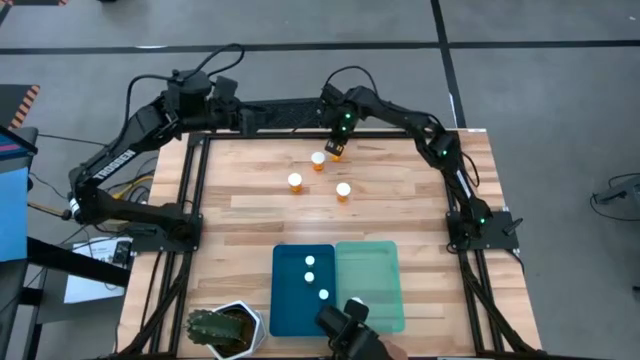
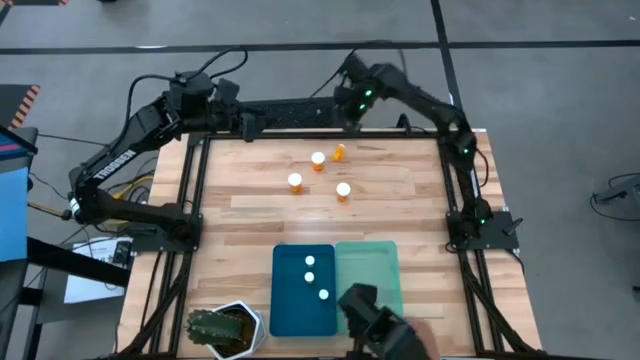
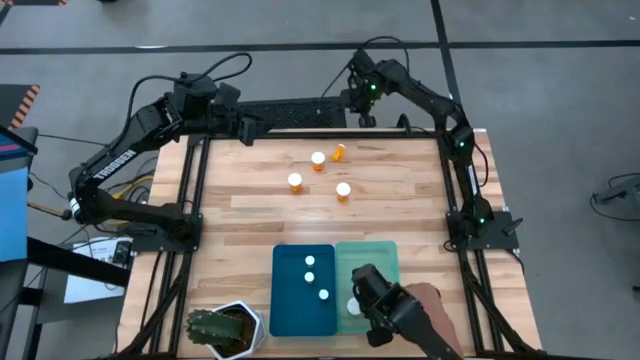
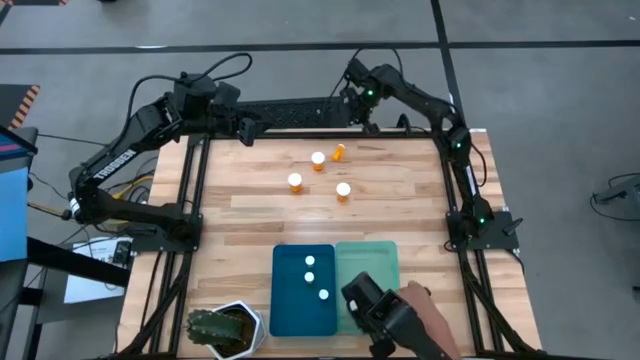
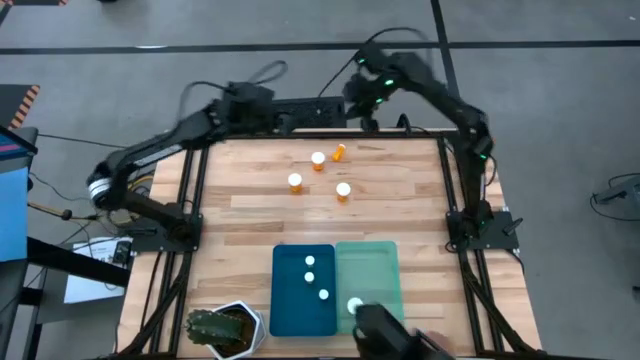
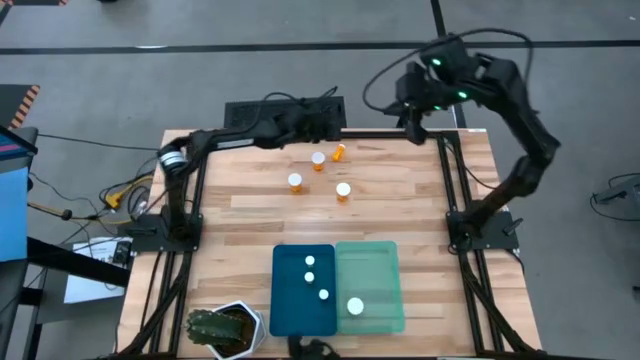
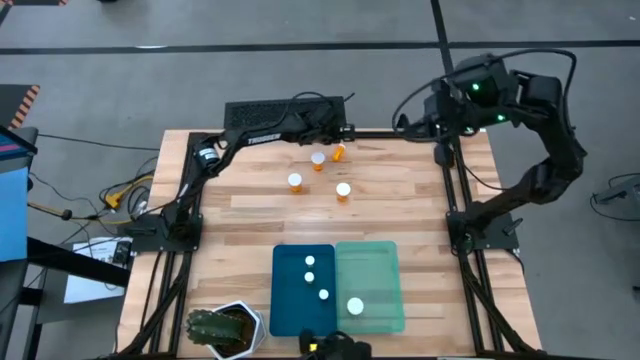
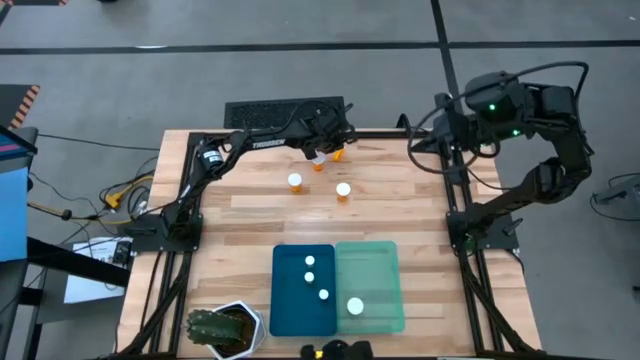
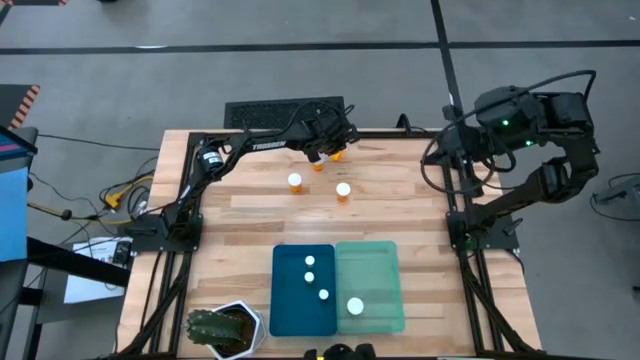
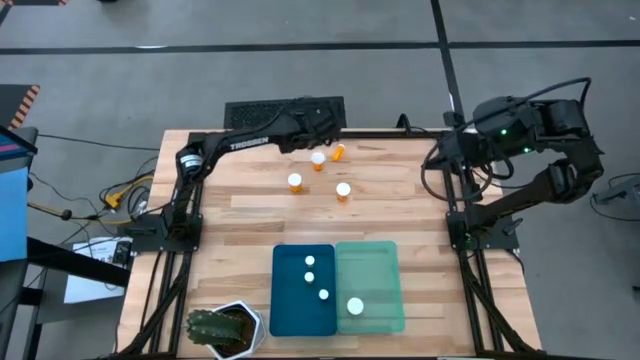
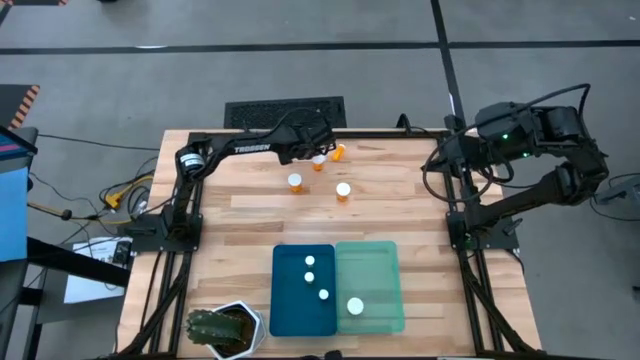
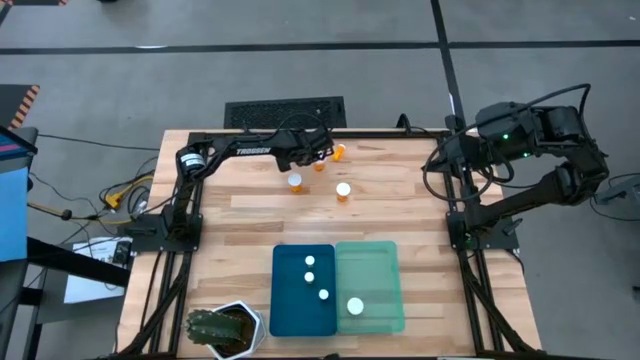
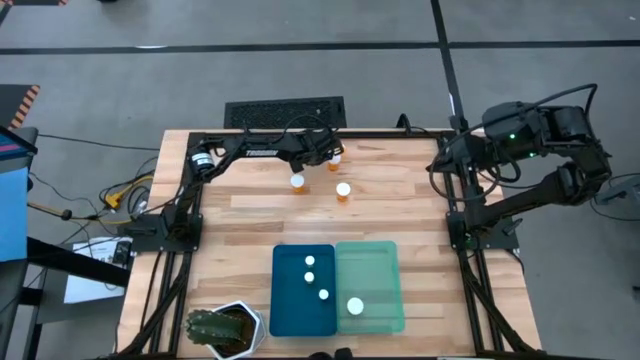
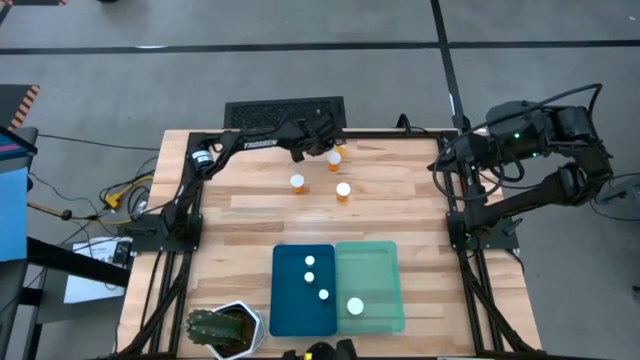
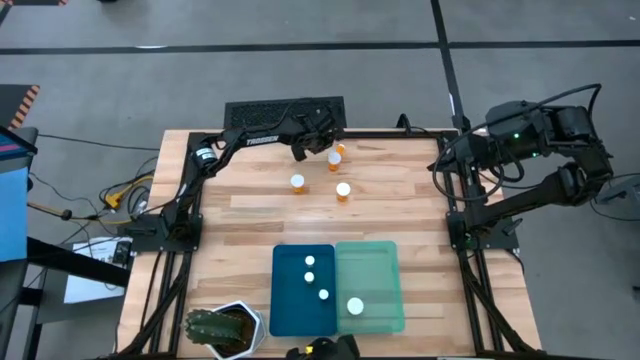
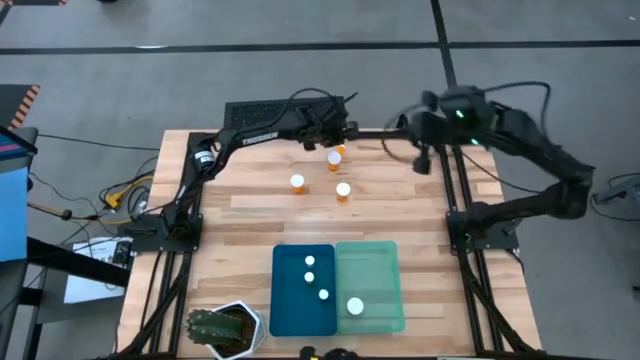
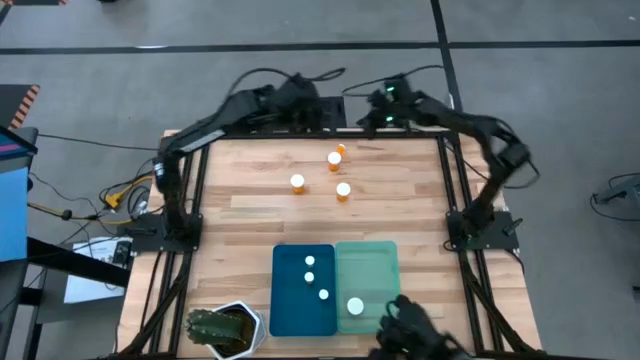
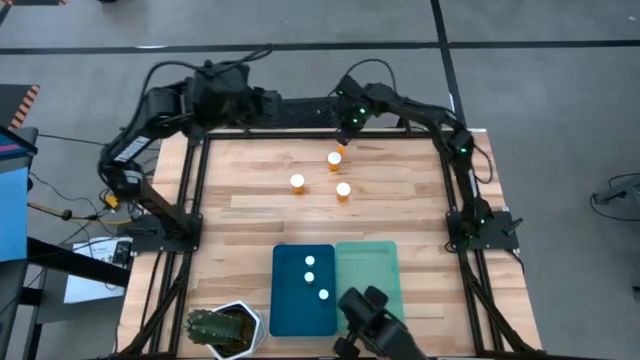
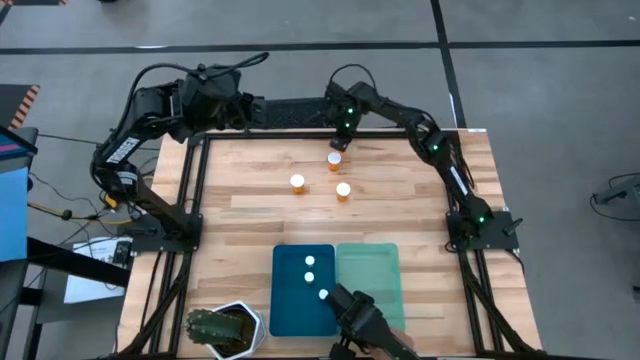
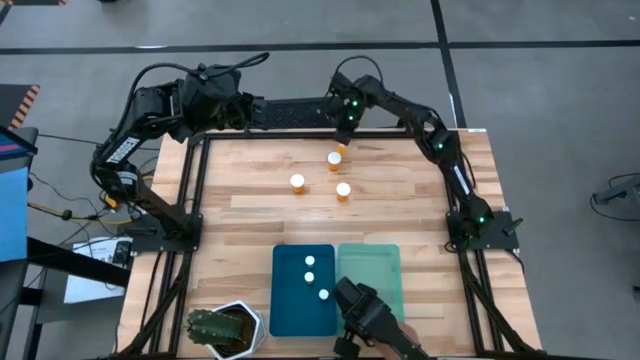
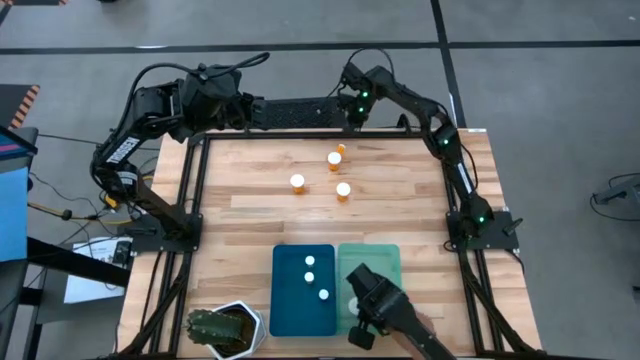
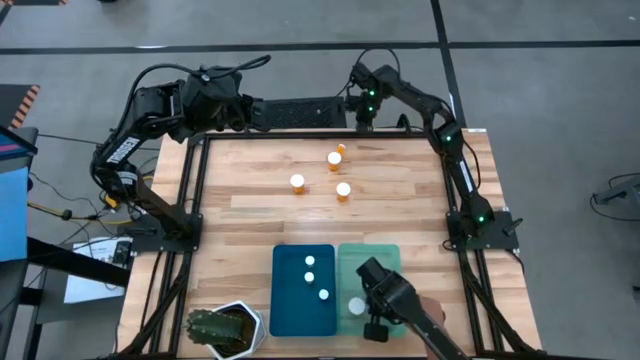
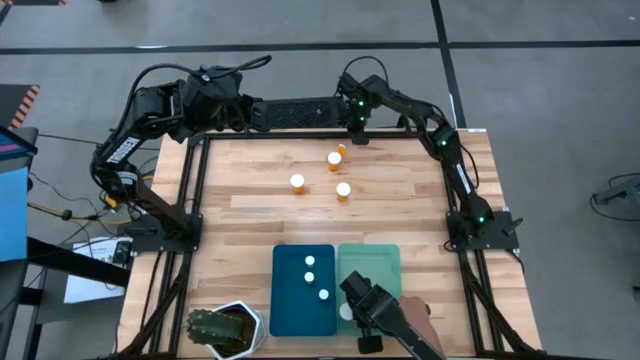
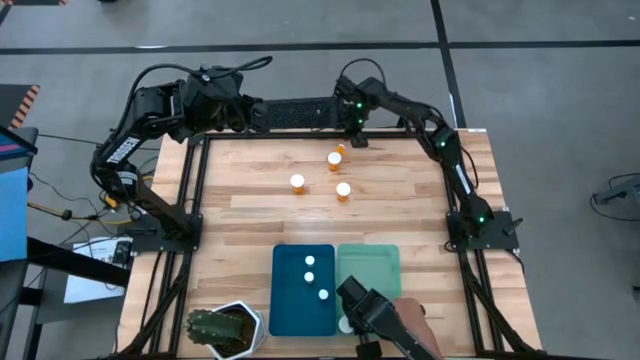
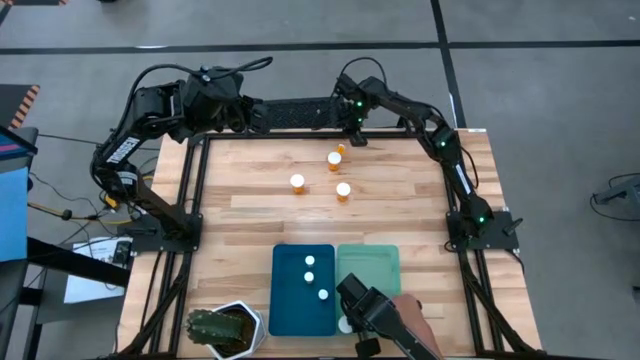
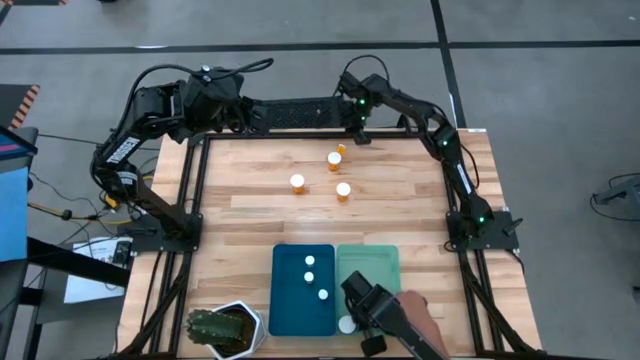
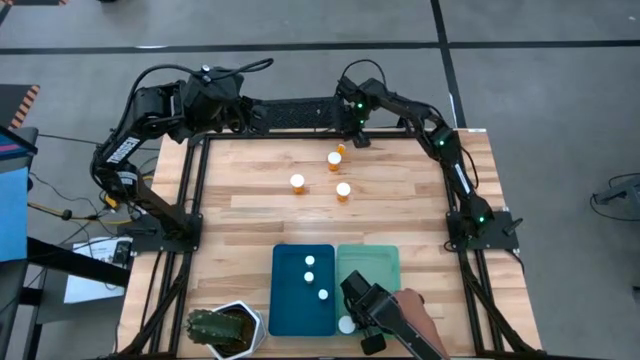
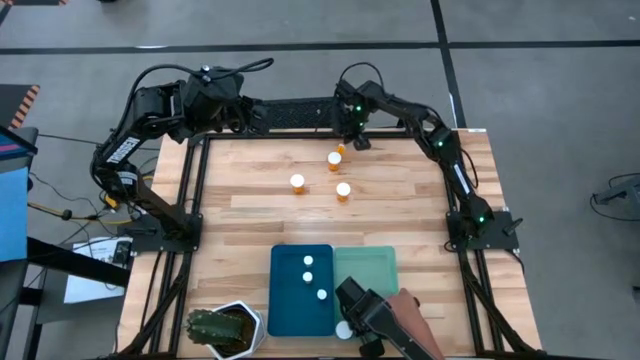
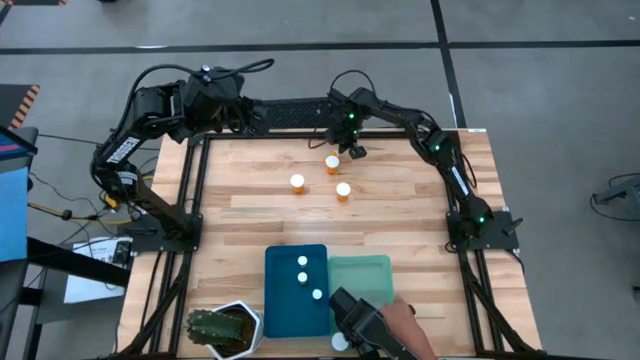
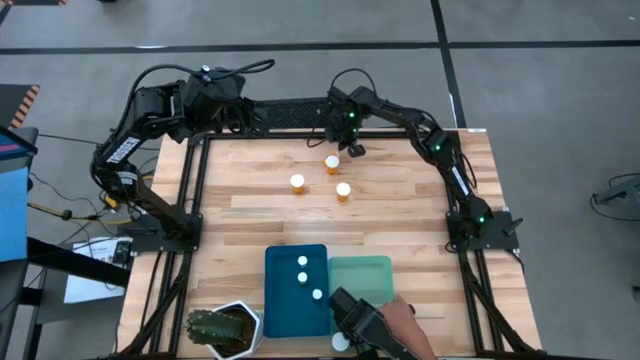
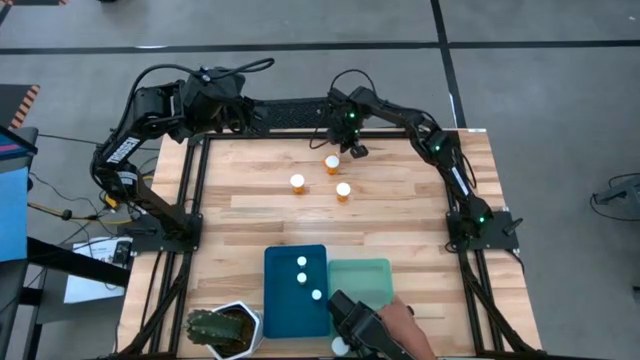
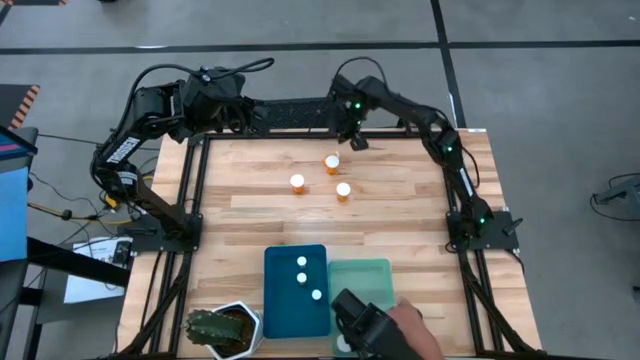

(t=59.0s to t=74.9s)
Task: Pick and place medicine bottles into bin by pill shape (circle, oval)
Put the small orange pill bottle into the blue bin

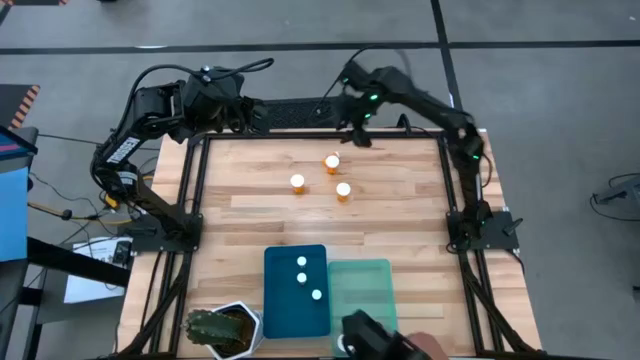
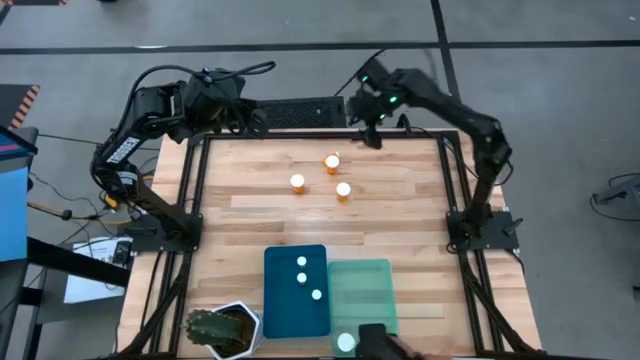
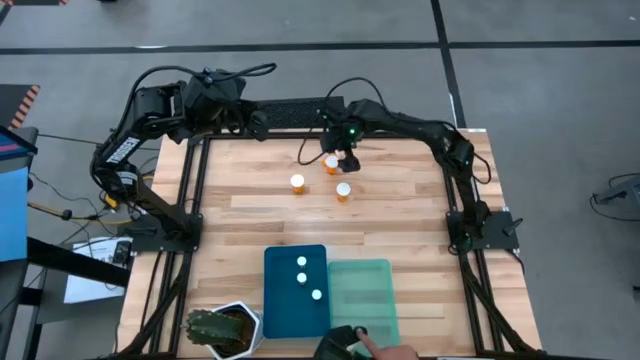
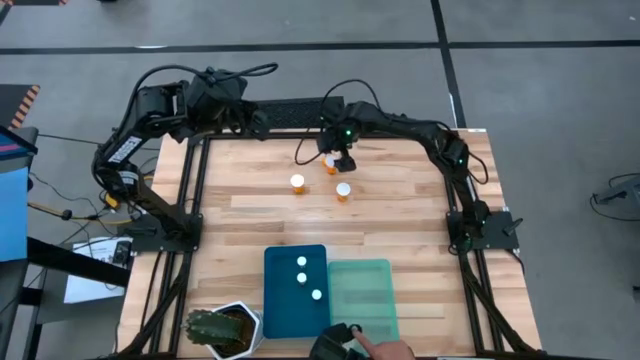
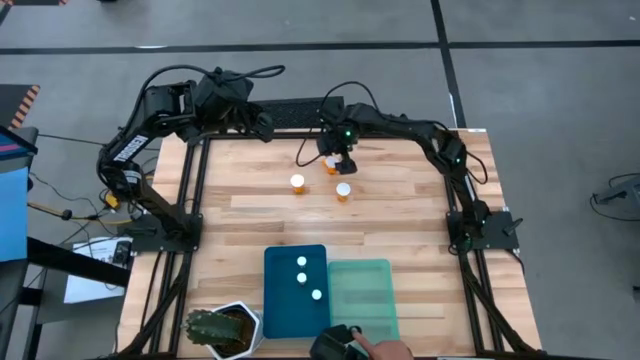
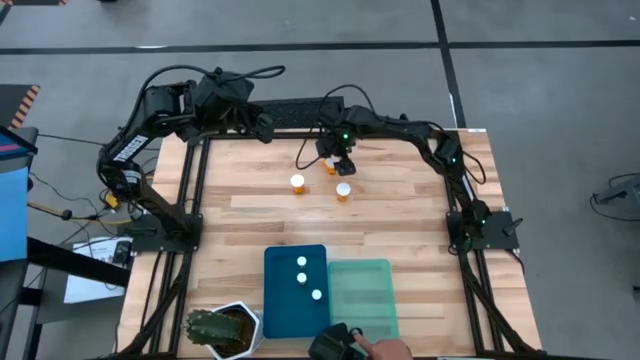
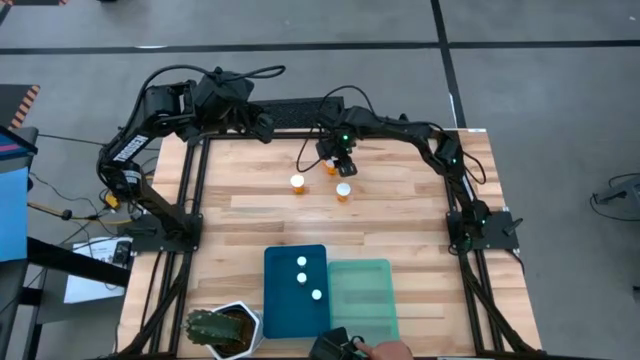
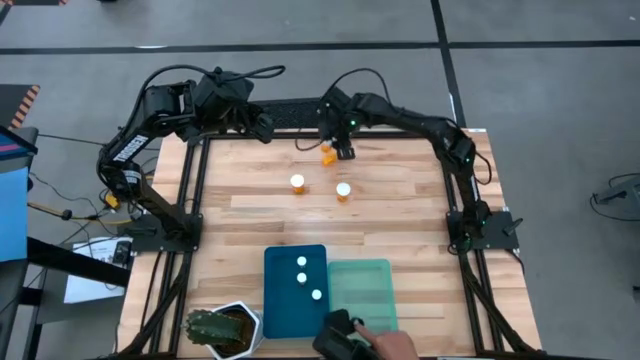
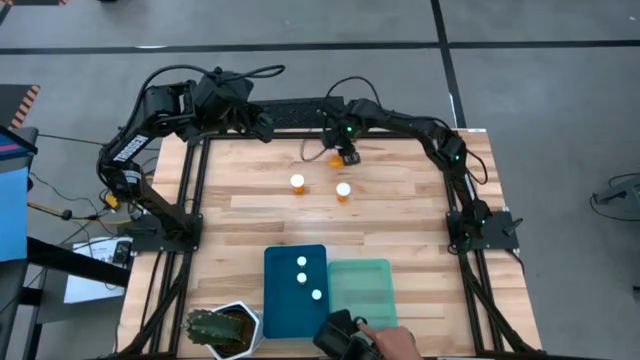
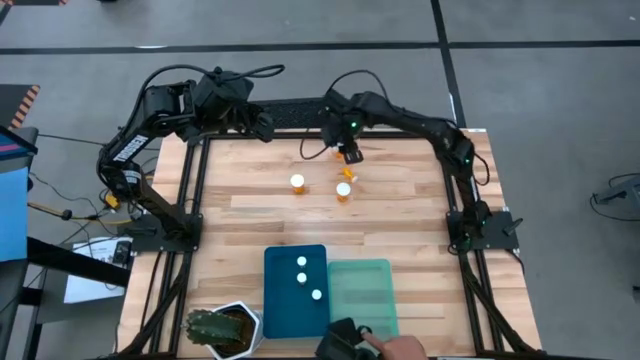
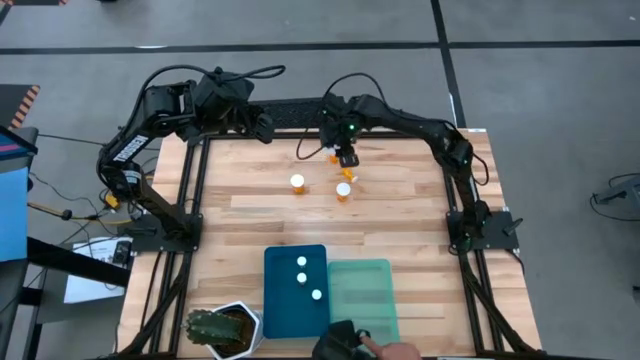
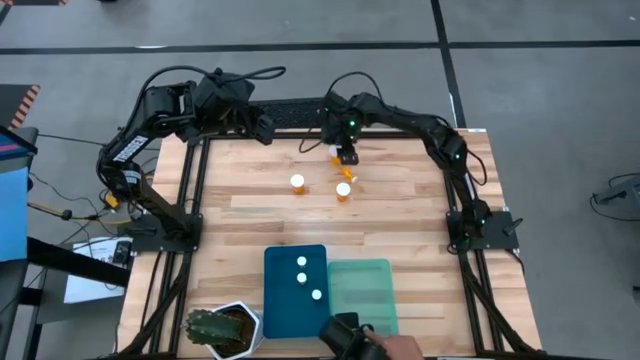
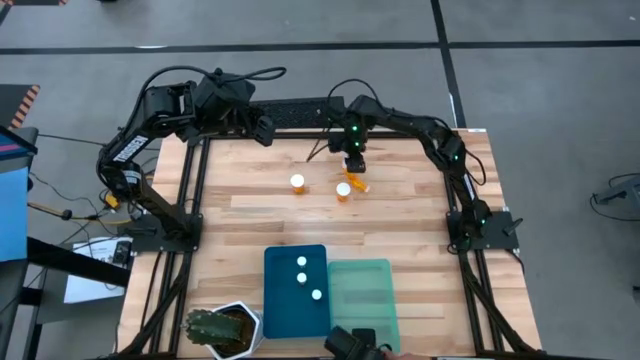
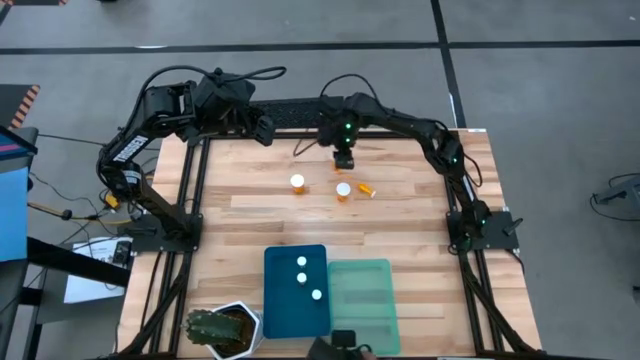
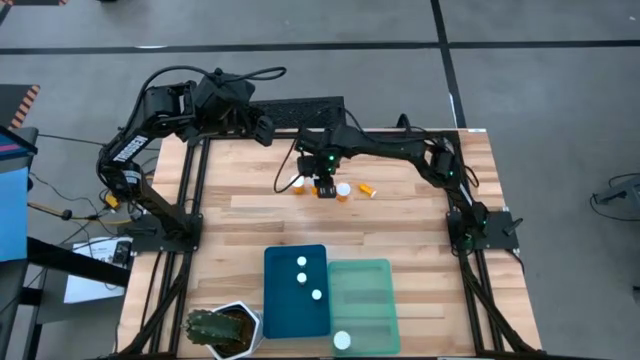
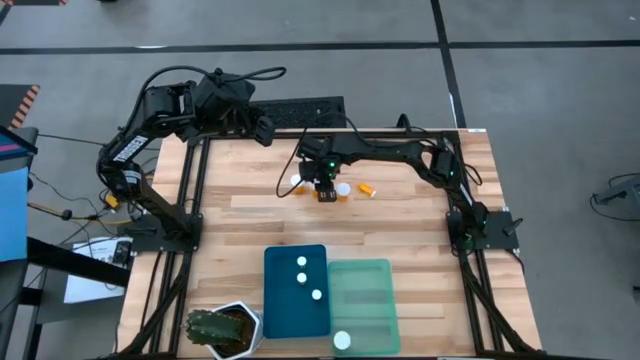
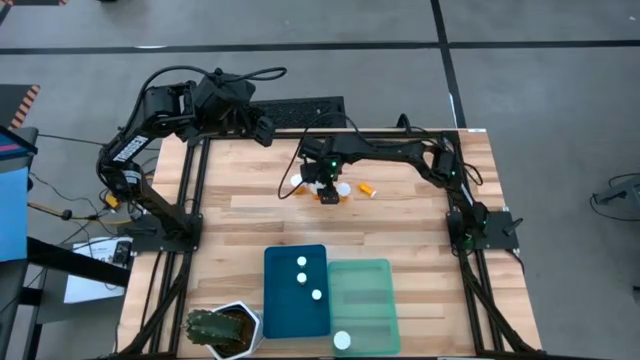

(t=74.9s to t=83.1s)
Move the large orange pill bottle to the middle of the orange pill bottles
